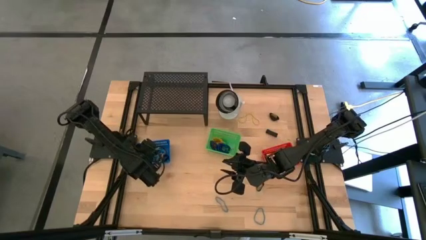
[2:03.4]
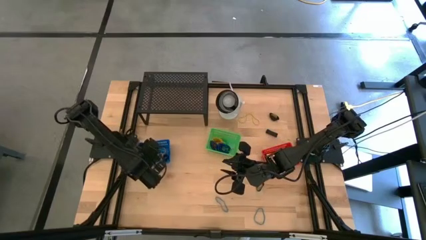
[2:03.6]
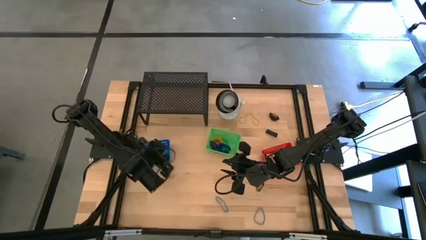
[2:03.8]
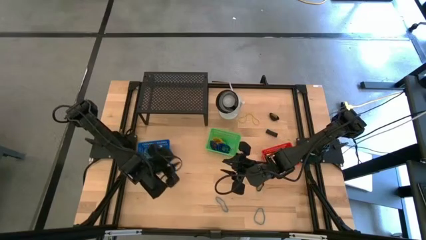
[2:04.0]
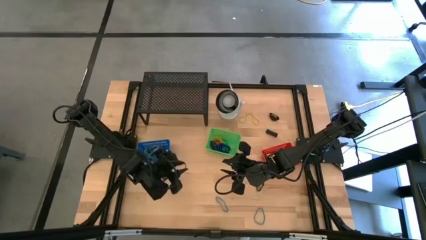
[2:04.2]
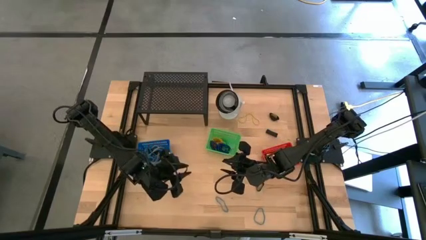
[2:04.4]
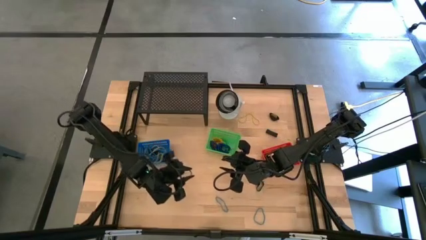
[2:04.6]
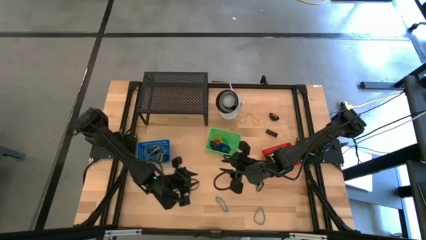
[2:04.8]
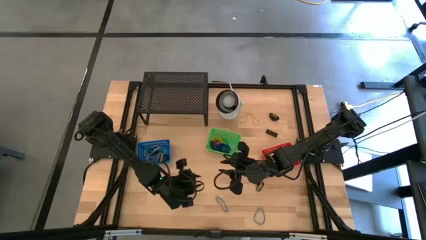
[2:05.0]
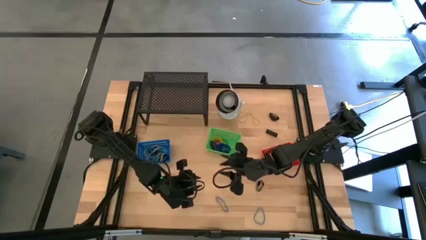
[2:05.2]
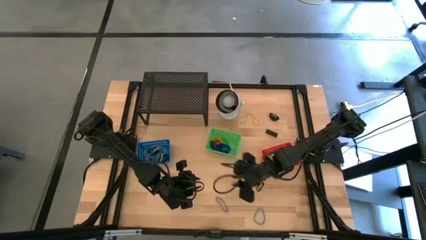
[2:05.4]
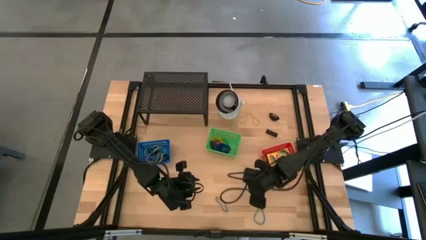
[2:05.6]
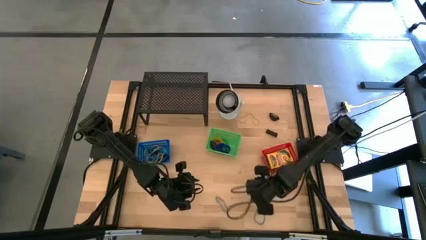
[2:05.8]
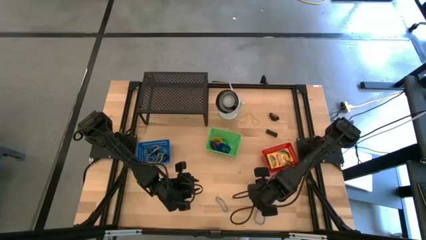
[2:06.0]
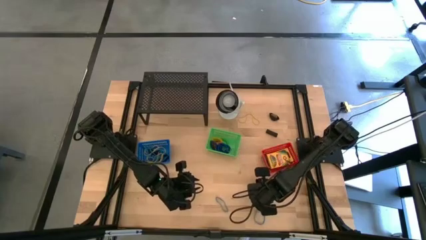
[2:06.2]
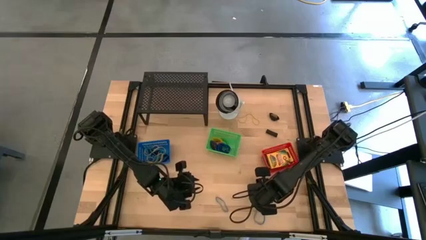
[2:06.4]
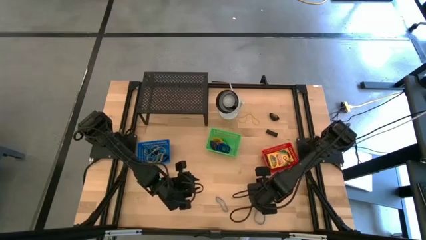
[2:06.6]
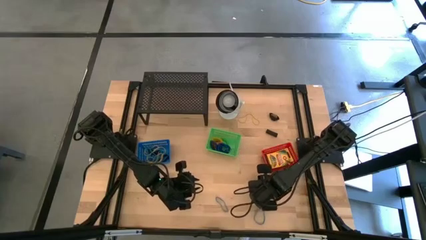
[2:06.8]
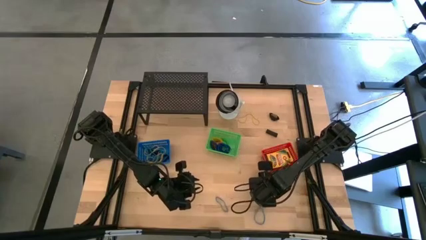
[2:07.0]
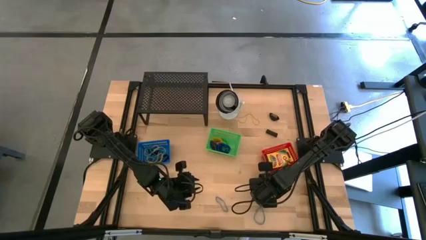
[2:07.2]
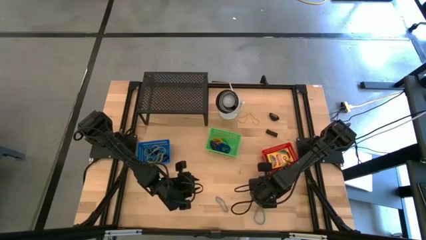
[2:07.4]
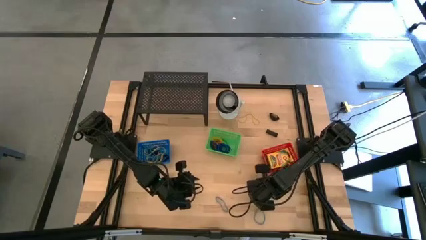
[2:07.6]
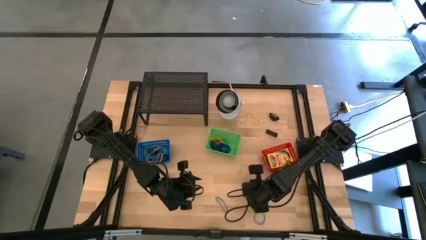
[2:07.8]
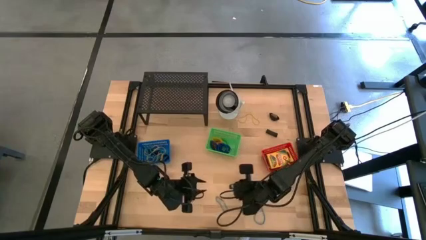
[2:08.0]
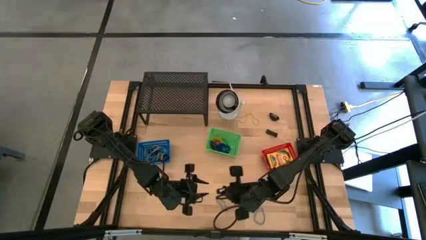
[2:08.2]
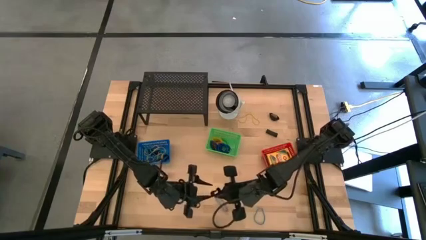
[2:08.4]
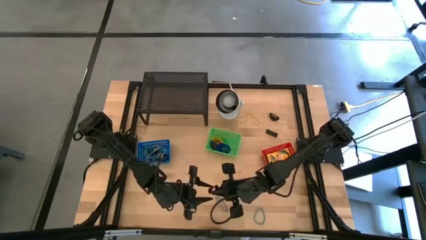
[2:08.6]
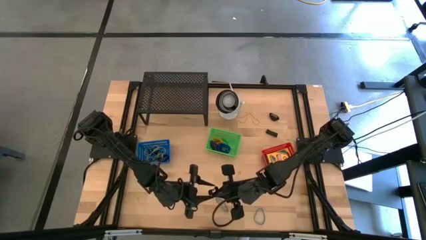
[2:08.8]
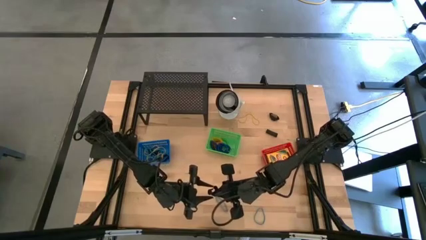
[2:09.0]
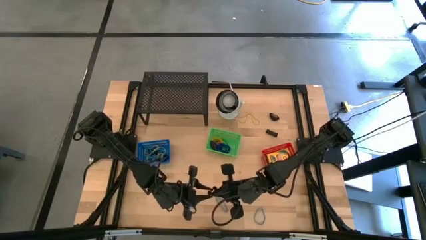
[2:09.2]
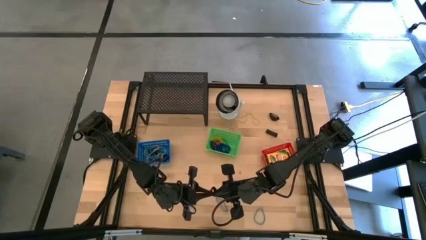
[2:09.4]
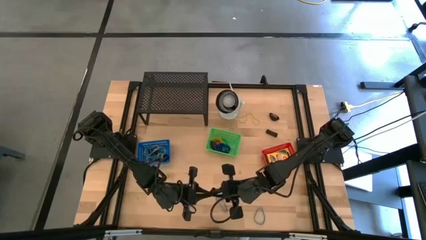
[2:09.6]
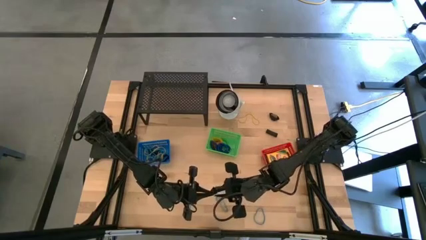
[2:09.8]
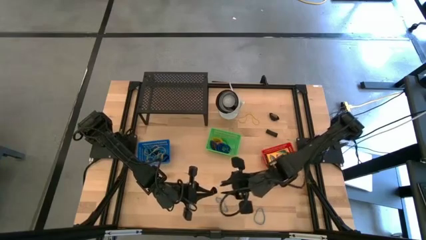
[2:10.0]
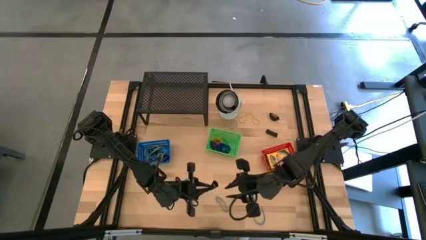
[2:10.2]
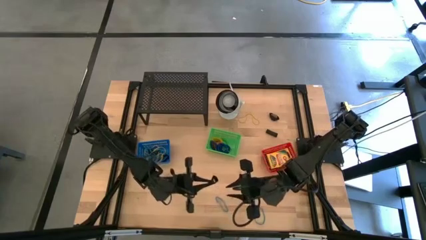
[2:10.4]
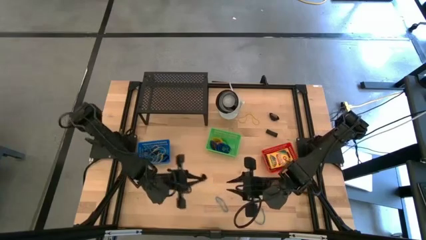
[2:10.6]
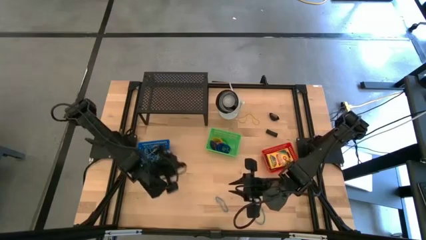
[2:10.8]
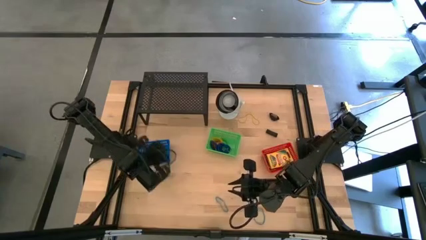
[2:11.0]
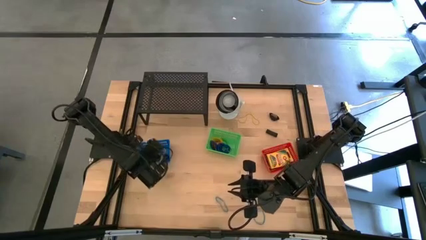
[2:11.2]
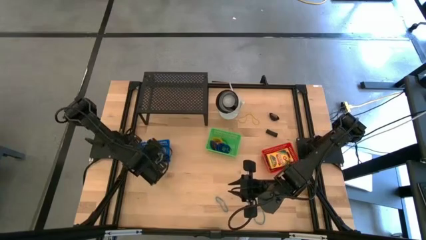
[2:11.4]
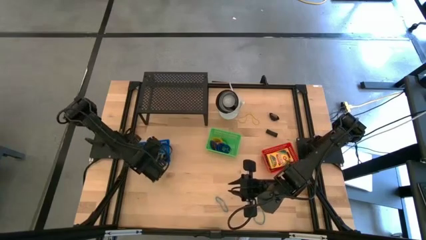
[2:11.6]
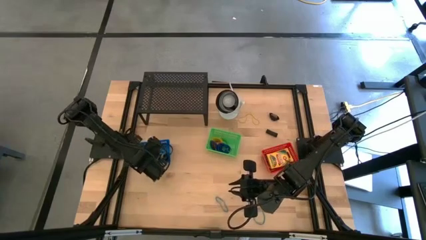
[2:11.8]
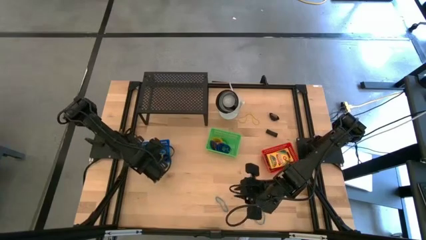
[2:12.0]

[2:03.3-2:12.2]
Task: Pick & Place Office Desk Supplies
Put the black rubber band into the blue bin

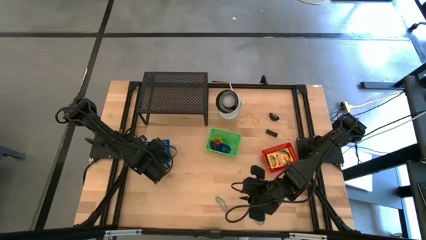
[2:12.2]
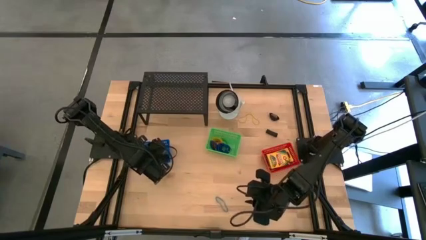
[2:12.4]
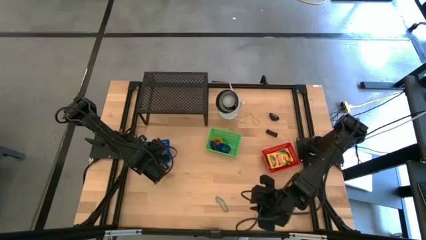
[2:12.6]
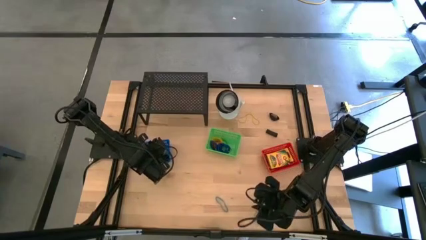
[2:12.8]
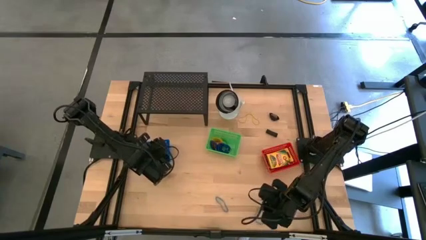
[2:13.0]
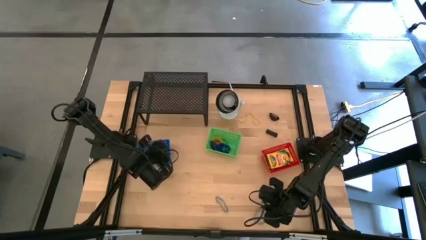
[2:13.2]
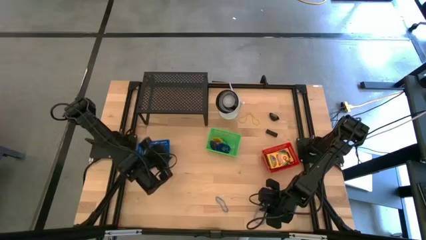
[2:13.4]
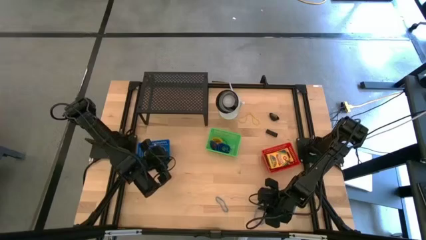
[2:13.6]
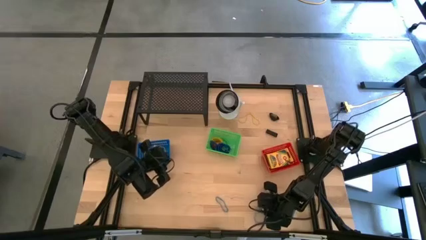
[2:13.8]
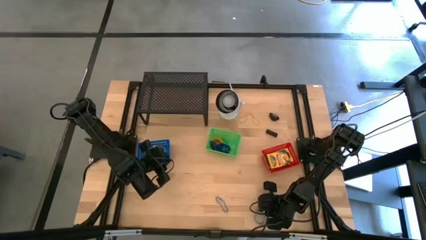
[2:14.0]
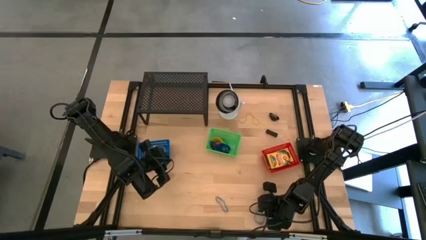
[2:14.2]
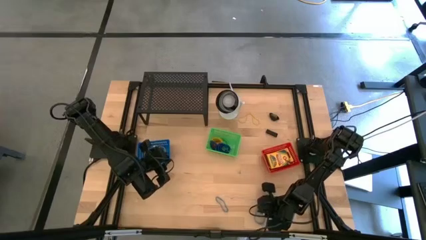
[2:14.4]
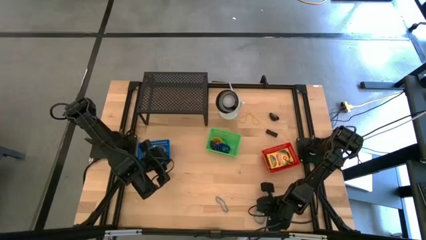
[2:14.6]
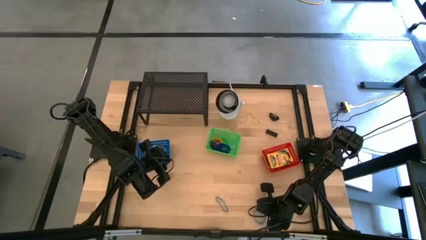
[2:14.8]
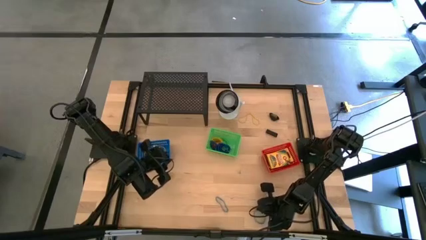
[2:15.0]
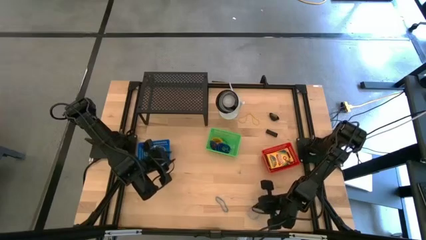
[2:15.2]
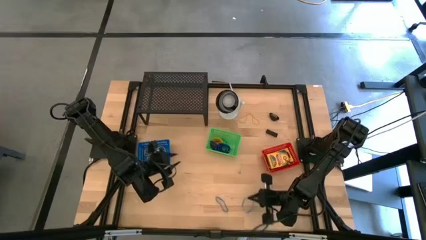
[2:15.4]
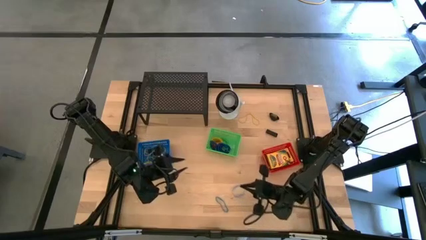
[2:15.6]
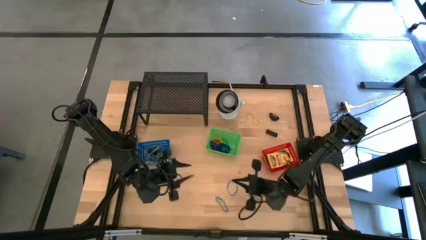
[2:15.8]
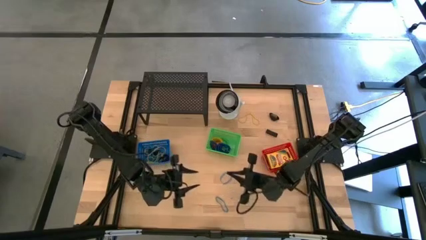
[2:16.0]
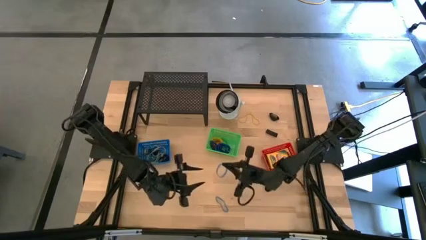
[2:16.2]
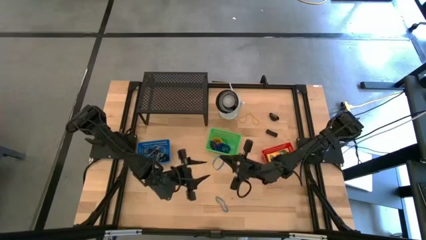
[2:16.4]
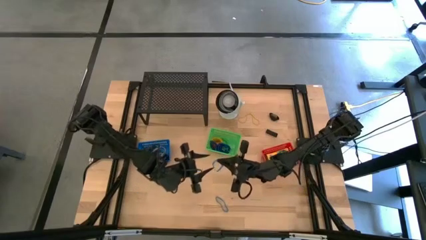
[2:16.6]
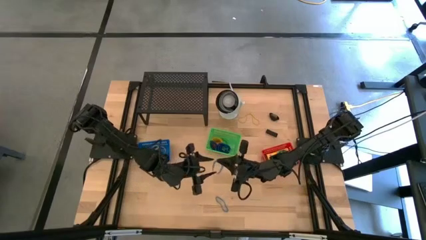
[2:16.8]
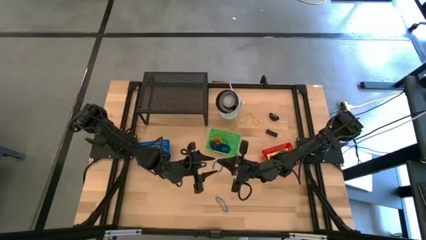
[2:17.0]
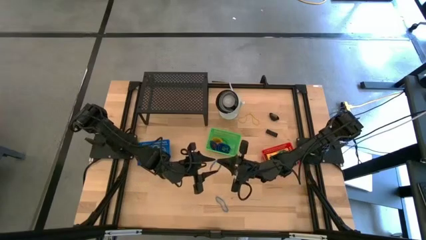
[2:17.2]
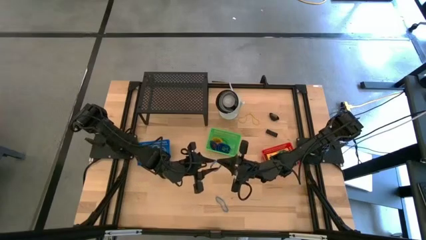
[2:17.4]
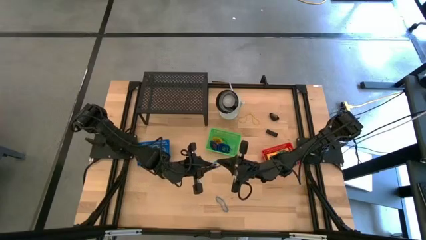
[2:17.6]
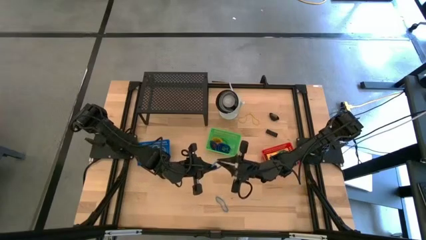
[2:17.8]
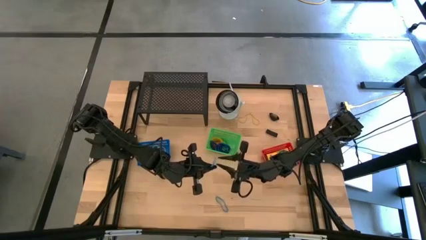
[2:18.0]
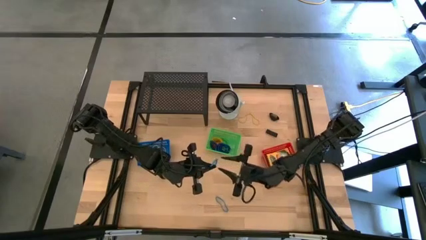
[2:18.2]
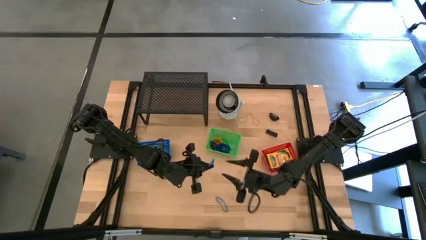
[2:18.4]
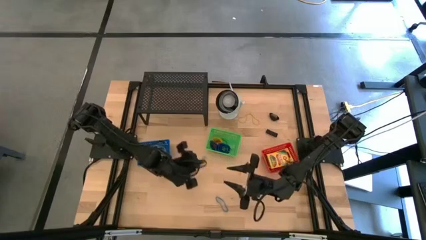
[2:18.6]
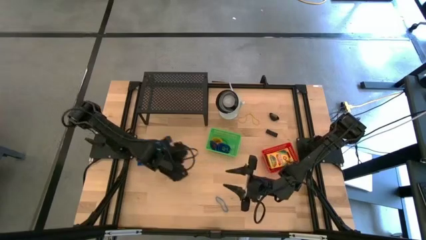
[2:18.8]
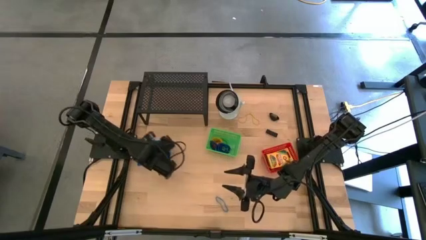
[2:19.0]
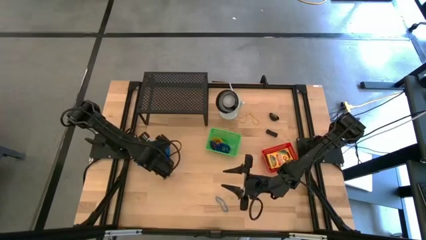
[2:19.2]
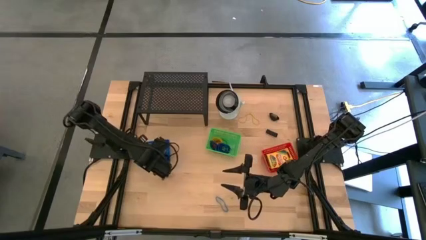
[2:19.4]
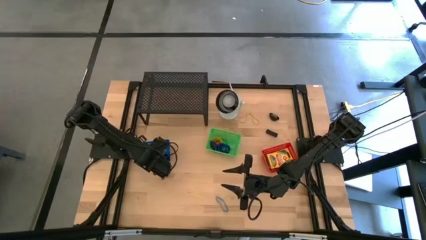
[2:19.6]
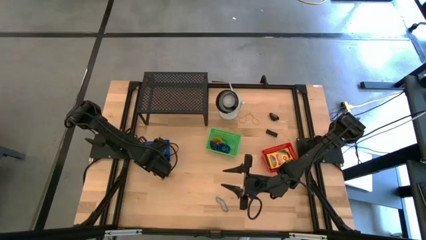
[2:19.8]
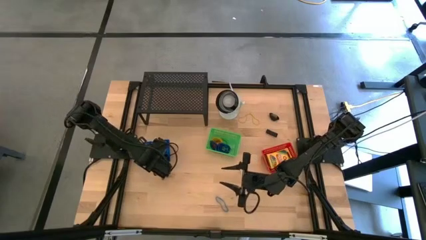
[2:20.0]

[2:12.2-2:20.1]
Put the blue rubber band into the blue bin
